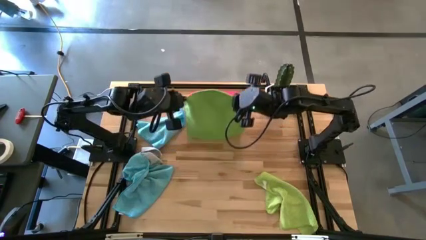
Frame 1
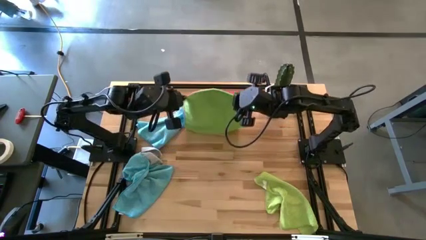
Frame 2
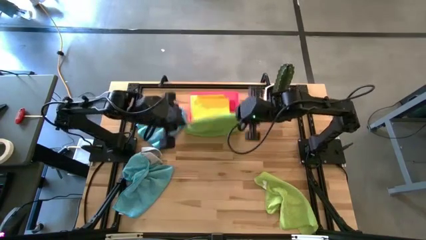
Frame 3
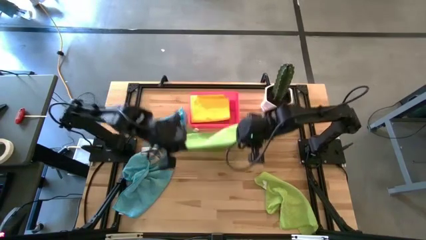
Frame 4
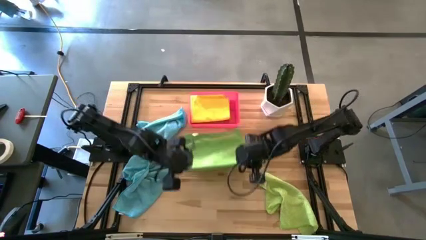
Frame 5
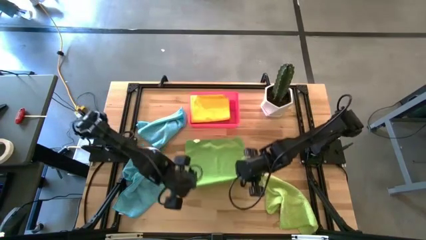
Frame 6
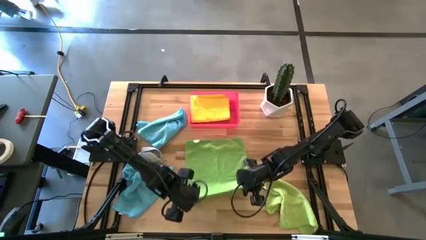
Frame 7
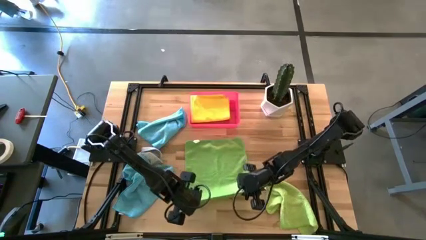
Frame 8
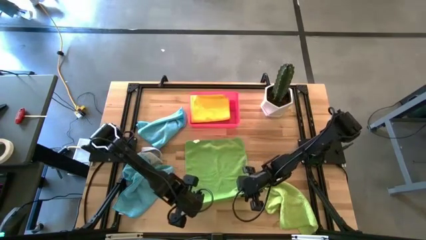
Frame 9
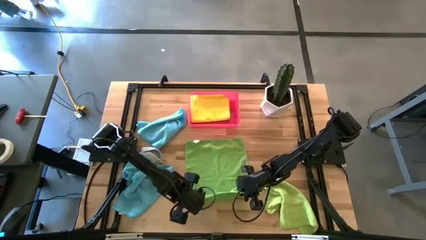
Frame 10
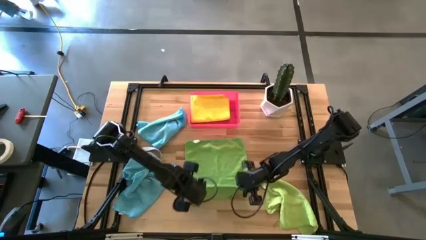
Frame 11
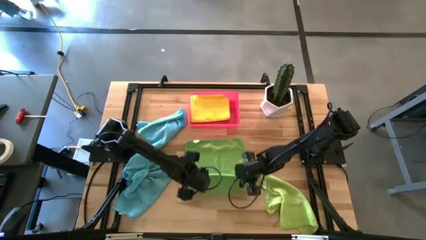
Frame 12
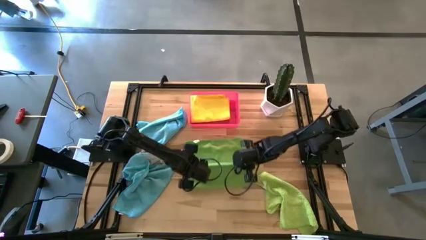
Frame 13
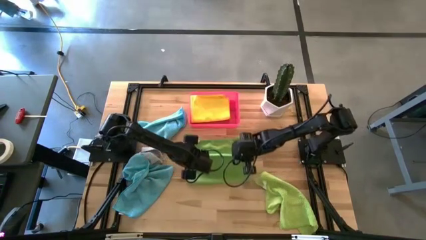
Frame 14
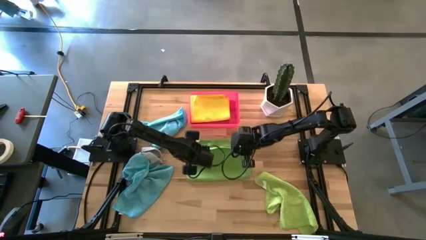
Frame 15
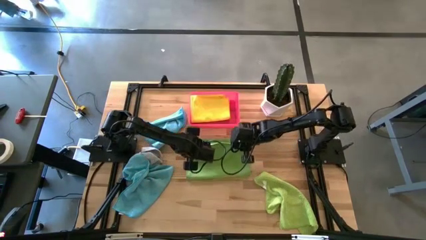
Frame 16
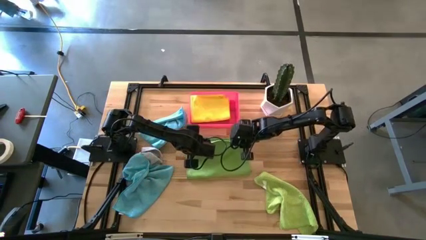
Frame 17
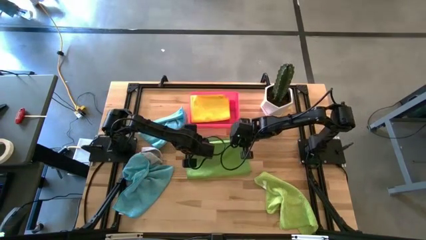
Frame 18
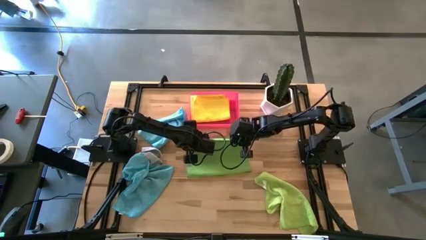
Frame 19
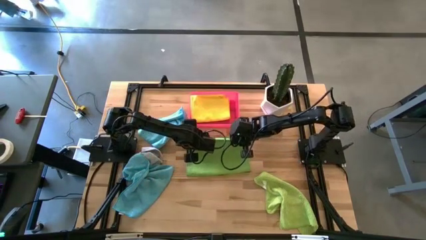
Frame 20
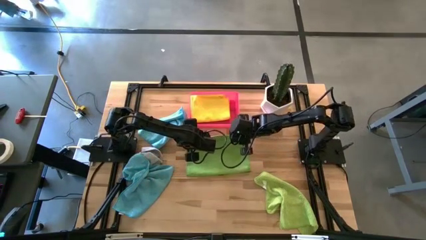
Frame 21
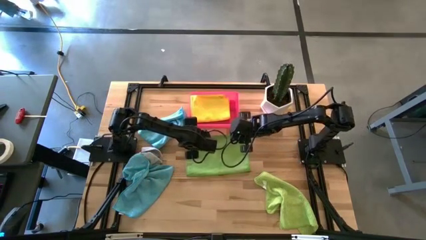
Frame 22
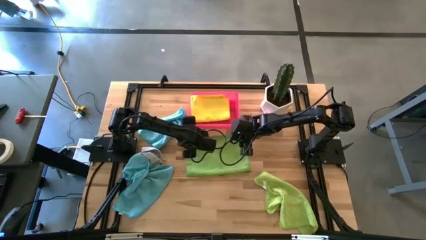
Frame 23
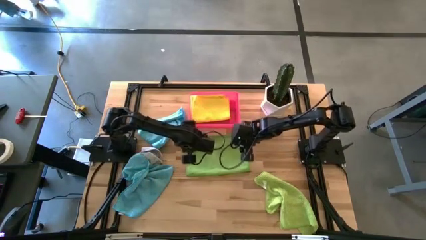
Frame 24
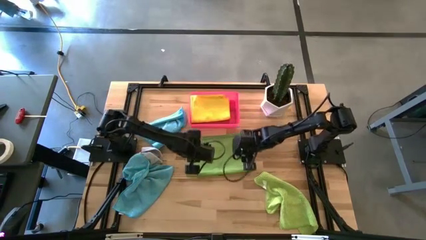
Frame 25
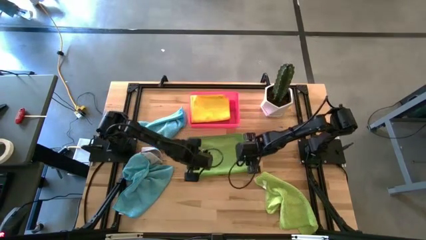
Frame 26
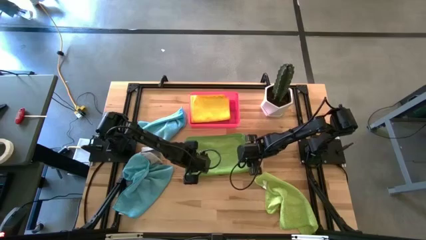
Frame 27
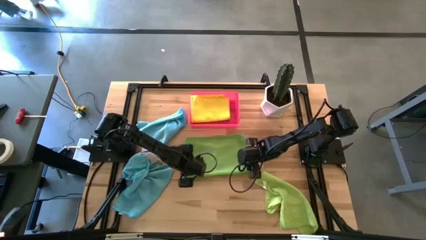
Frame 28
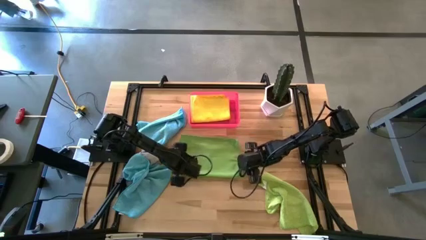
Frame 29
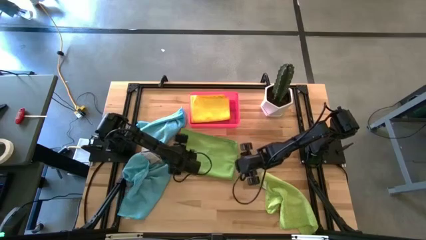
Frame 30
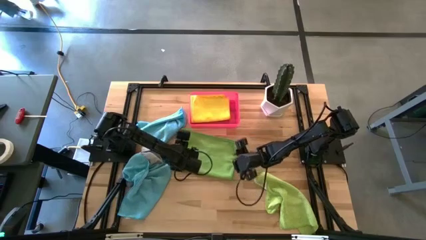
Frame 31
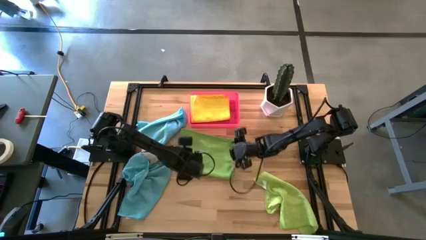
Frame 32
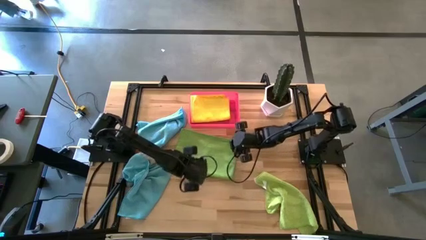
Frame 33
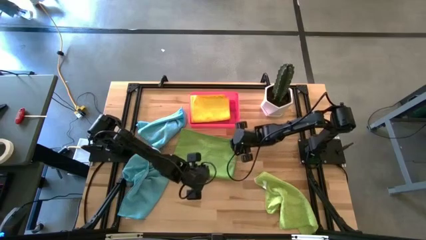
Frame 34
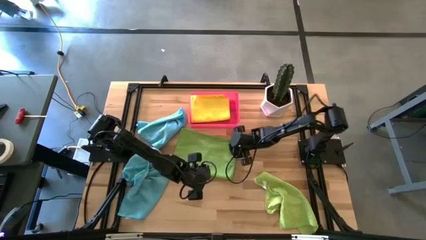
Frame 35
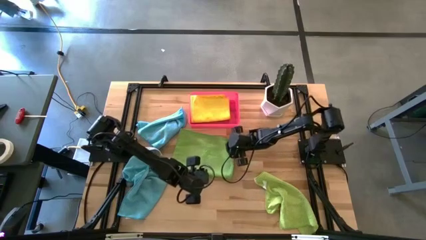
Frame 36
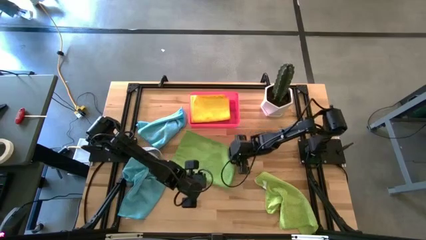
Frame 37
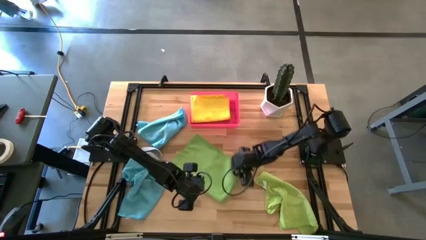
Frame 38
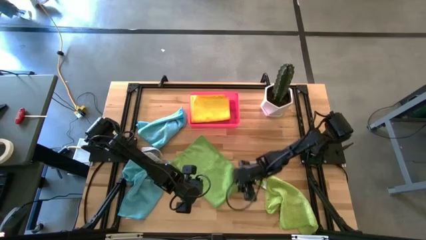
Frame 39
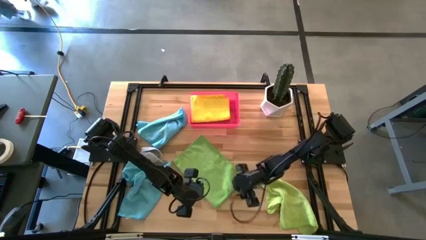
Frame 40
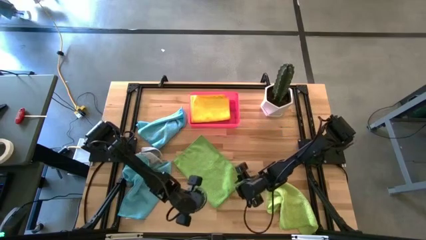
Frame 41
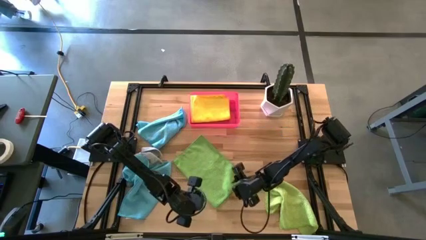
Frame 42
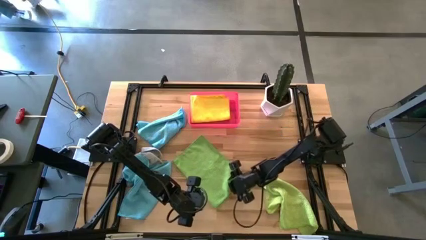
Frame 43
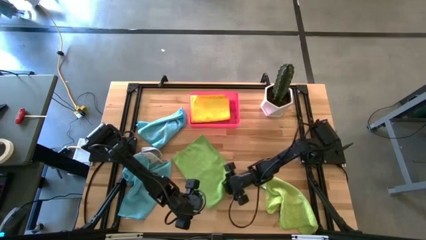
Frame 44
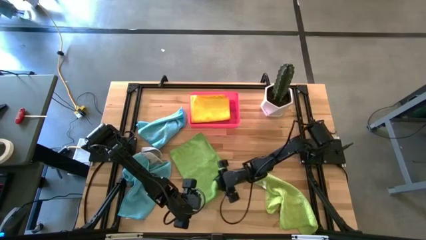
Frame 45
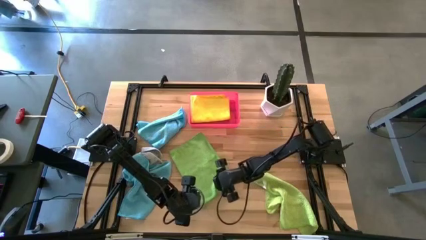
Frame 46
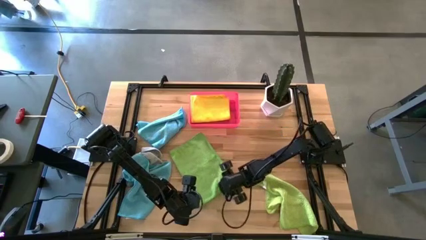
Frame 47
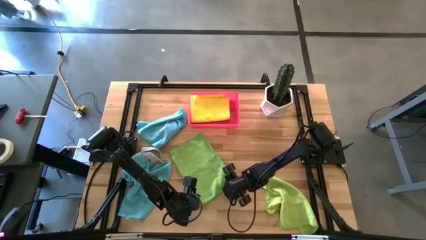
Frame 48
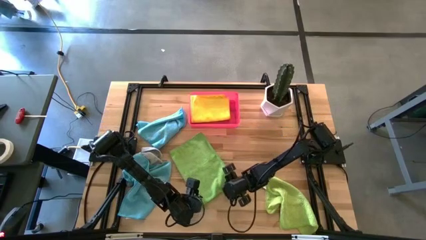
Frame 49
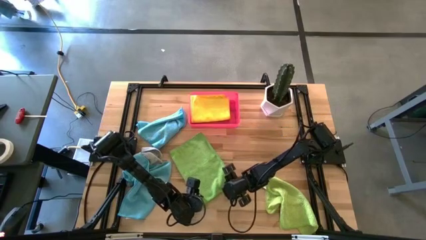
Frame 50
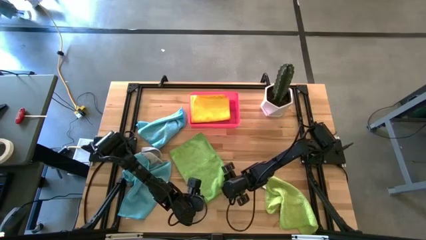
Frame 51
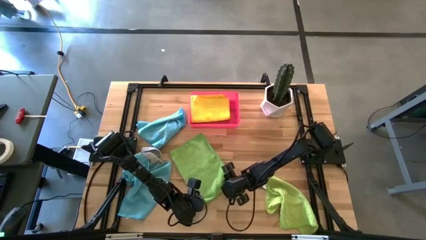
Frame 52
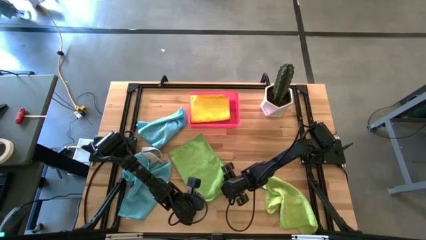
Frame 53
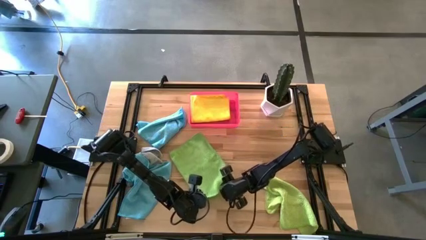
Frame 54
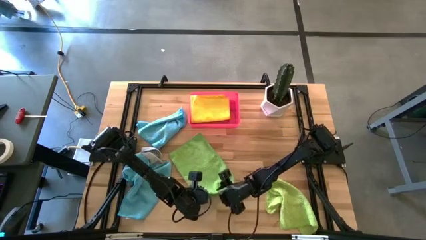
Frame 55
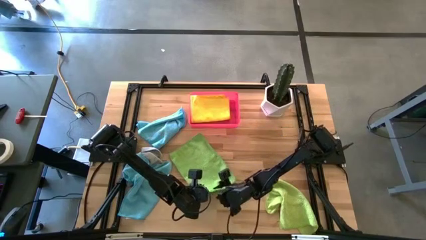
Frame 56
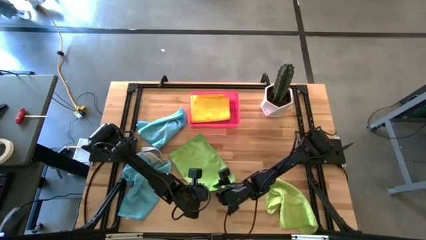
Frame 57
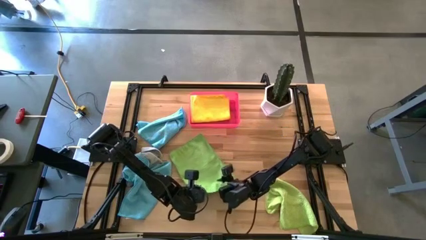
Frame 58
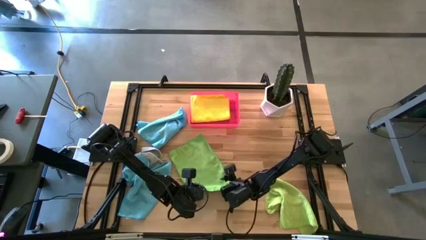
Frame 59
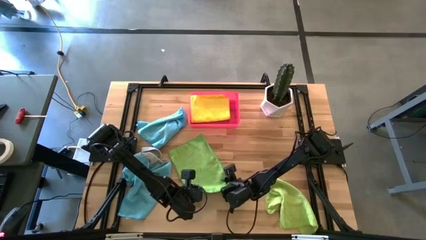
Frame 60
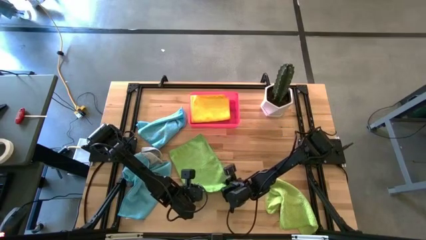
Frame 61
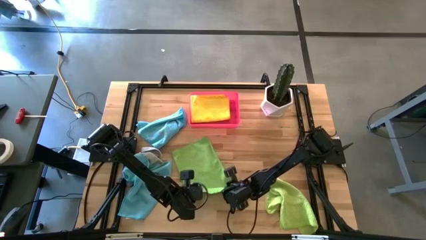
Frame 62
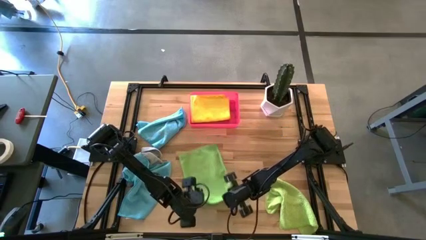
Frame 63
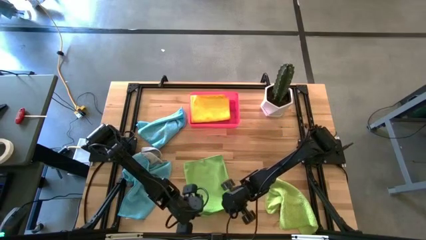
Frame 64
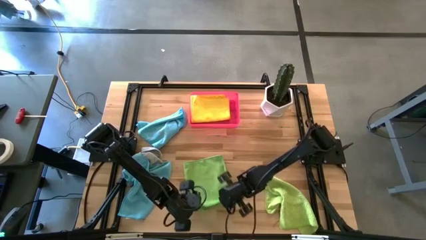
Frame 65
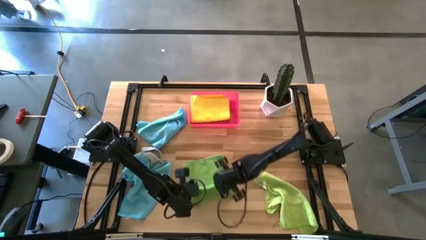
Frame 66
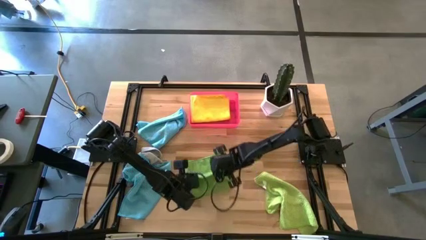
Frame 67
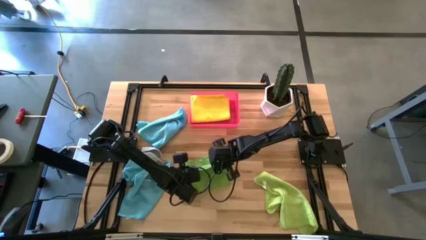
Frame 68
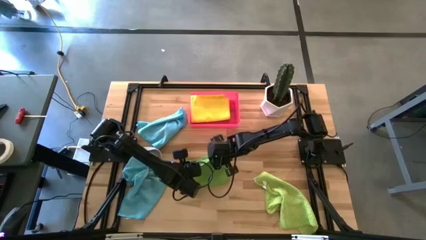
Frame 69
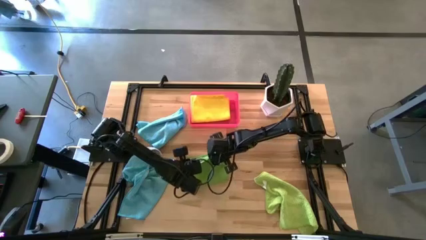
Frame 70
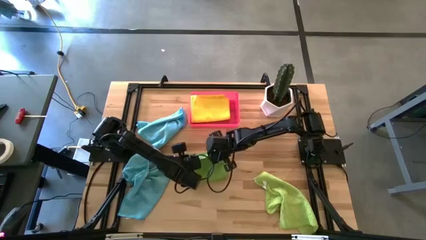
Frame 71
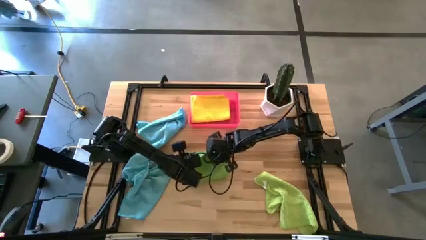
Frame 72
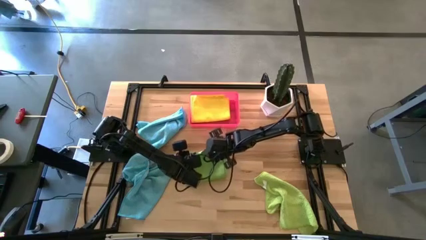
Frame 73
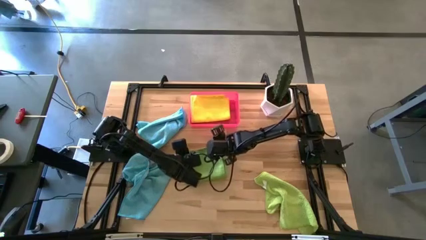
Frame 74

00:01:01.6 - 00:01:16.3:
Task: Fold microfiber towels
Fold the green microfiber cloth

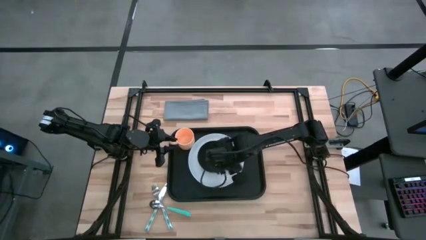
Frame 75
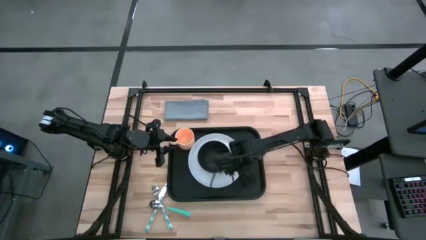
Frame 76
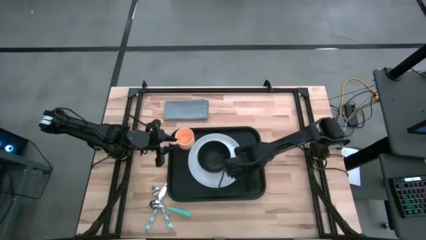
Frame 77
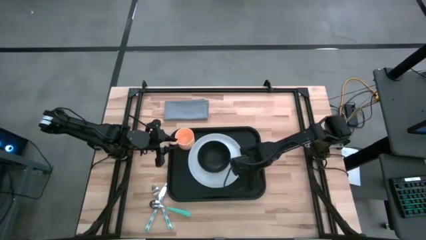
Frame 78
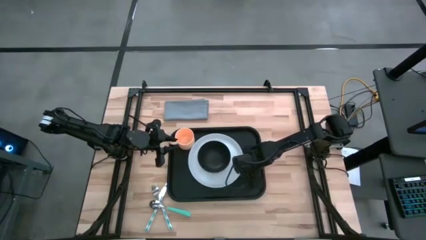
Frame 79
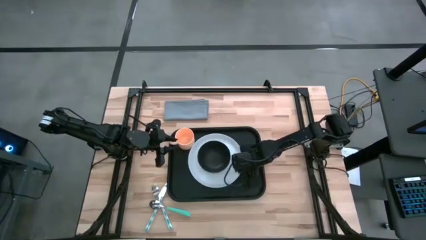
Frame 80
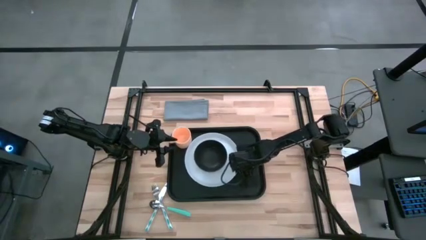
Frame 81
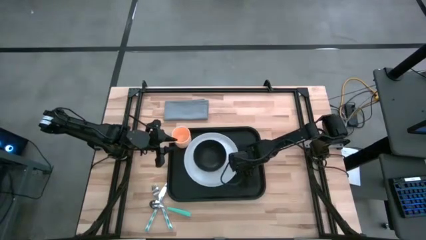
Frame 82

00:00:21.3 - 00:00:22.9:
Task: Set up tray
Adjust the white plate on the black serving tray
